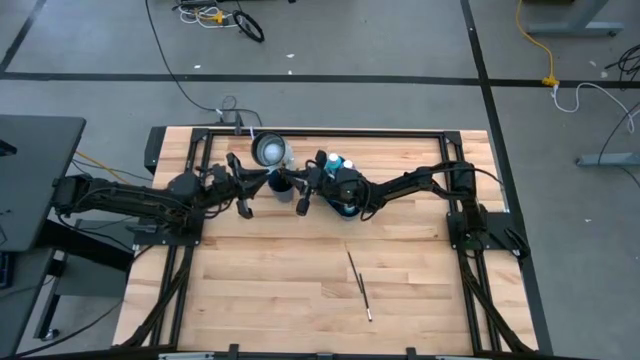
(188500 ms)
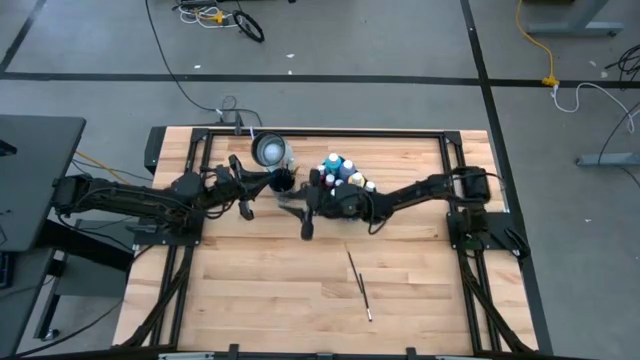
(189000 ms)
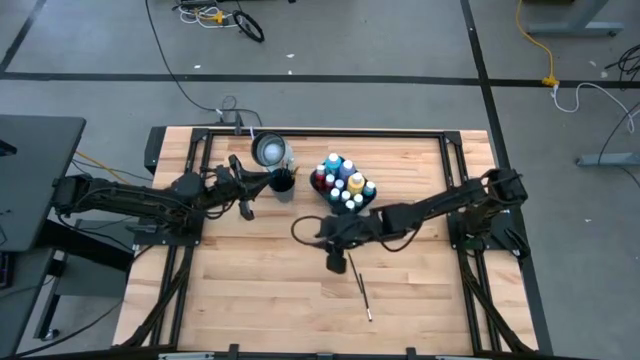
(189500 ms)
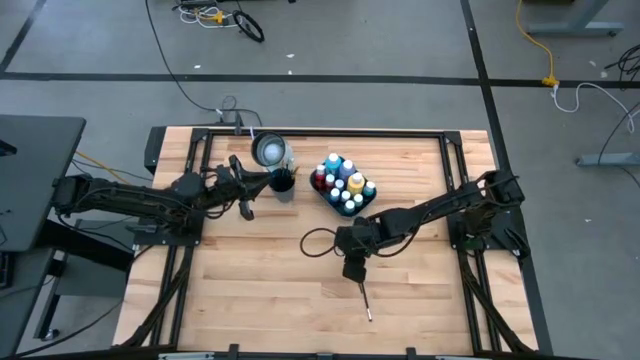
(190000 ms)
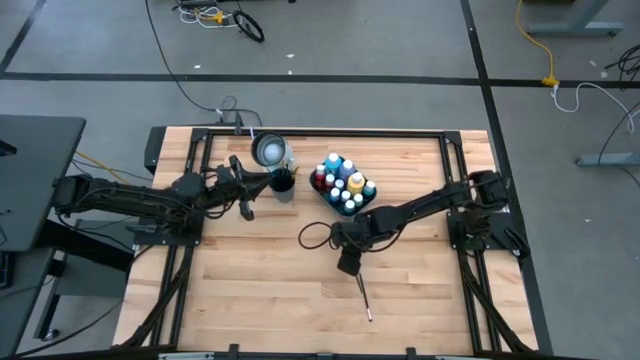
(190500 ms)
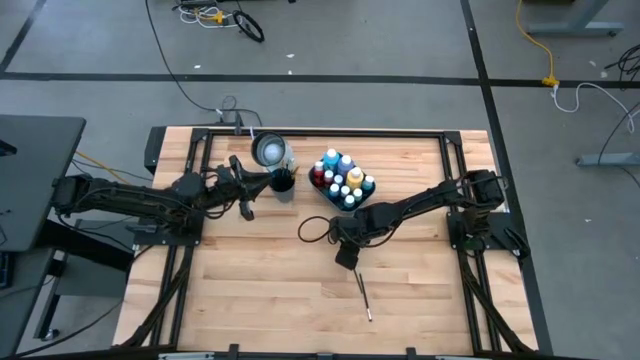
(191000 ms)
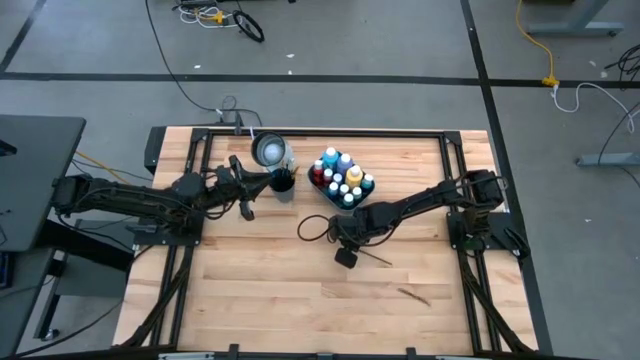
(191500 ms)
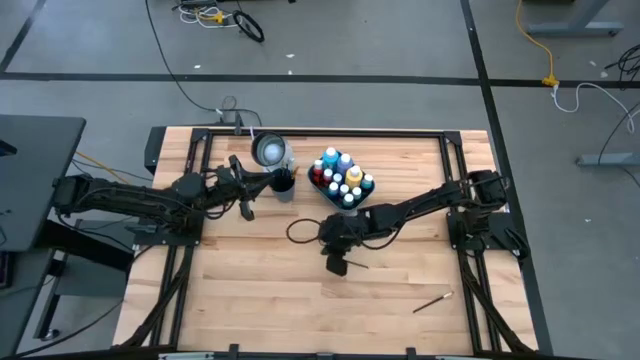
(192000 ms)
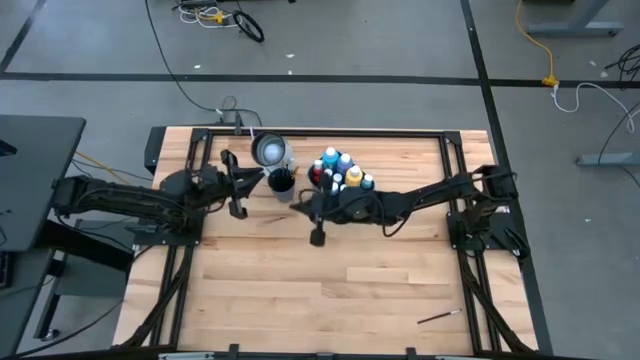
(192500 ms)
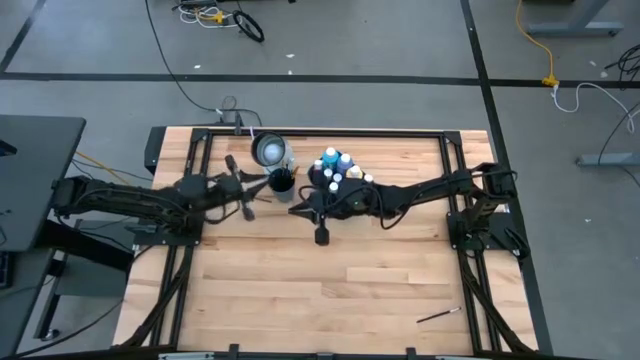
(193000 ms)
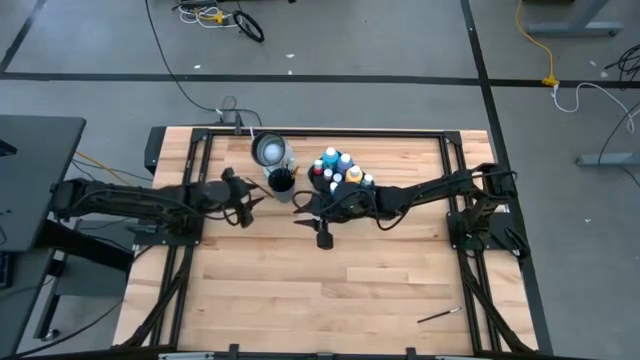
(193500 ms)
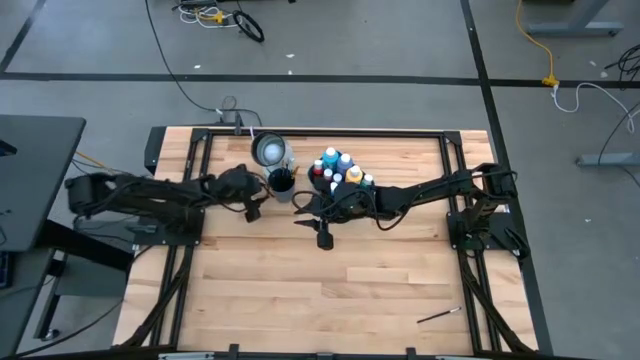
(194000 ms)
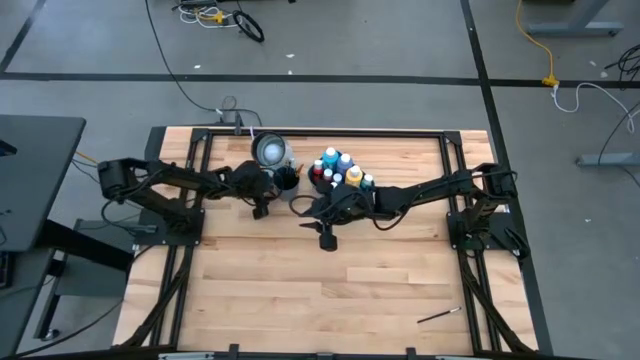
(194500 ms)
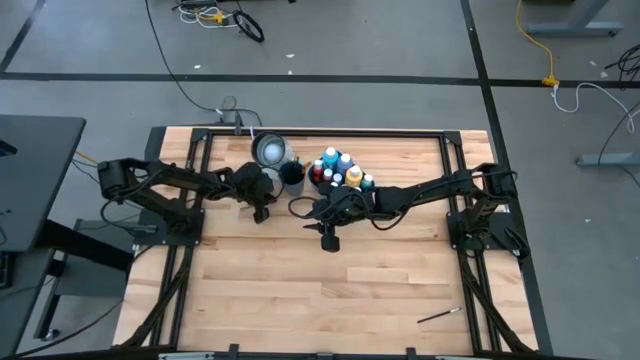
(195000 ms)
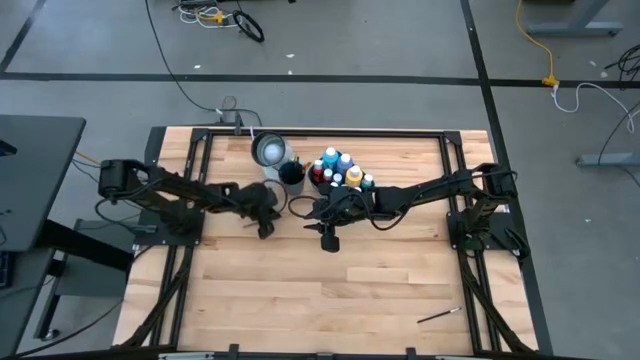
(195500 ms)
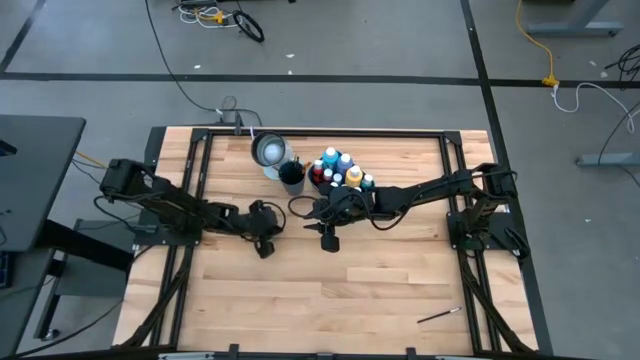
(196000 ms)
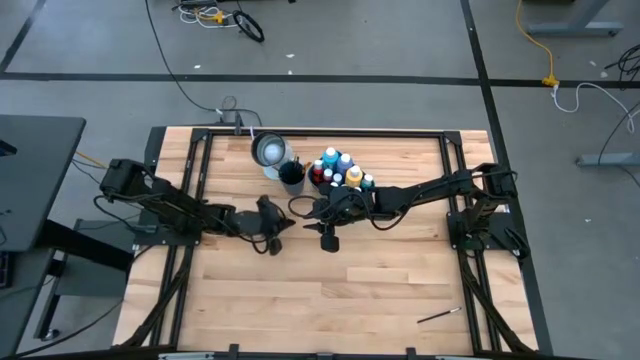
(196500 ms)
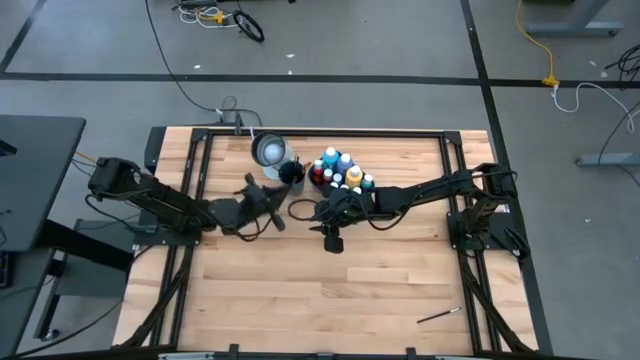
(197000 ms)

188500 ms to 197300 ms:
Task: Pick & Place Paint Supplies
Put the gold paint brush into the blue cup

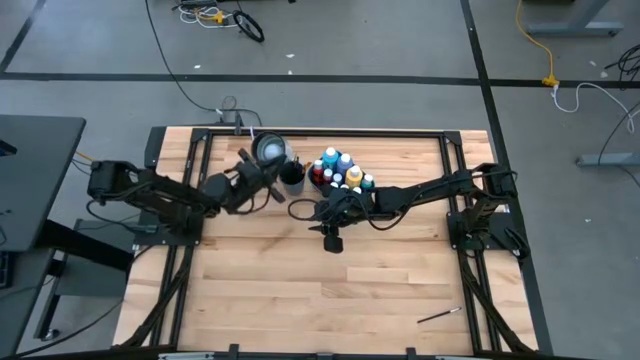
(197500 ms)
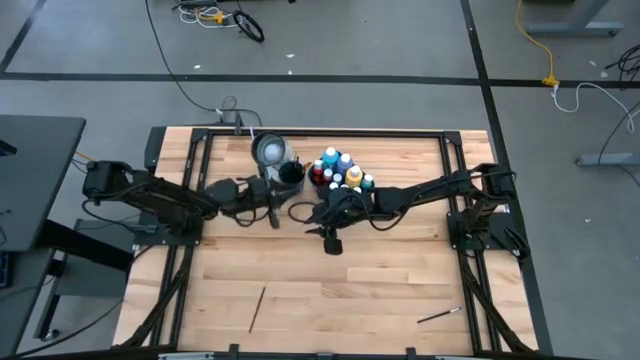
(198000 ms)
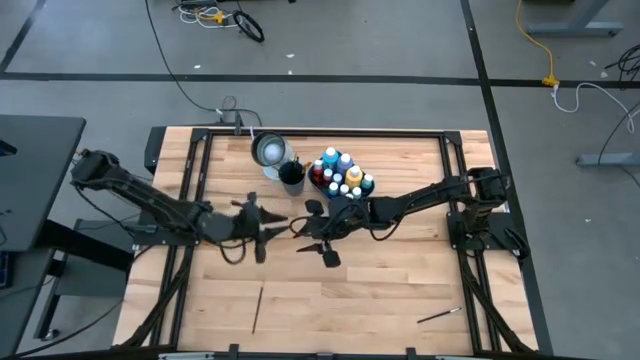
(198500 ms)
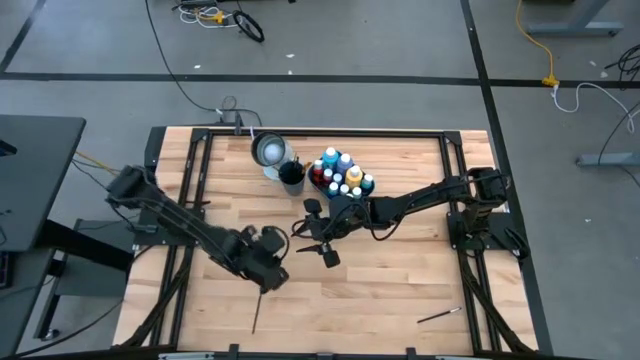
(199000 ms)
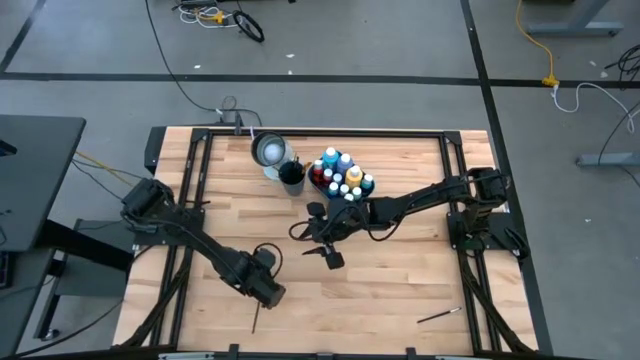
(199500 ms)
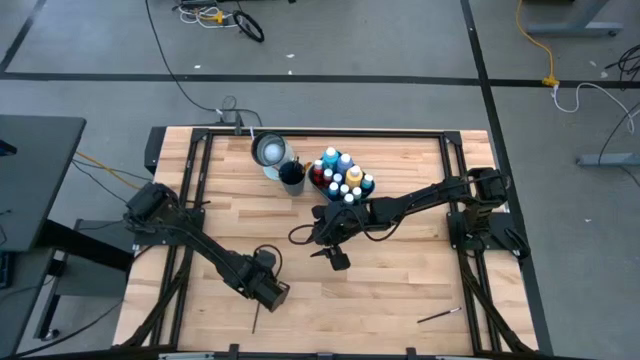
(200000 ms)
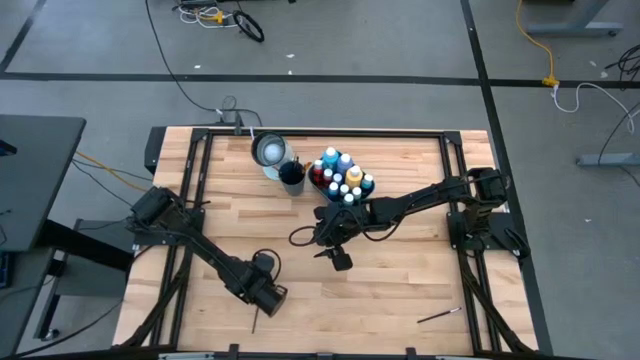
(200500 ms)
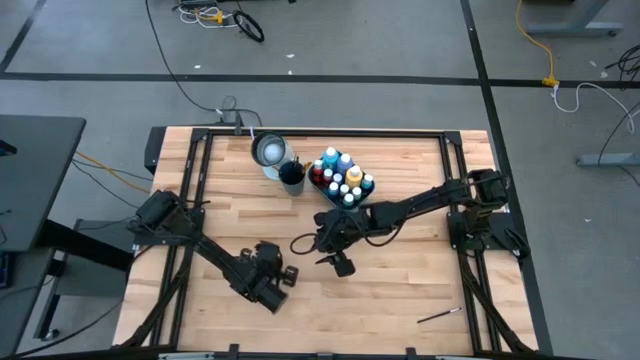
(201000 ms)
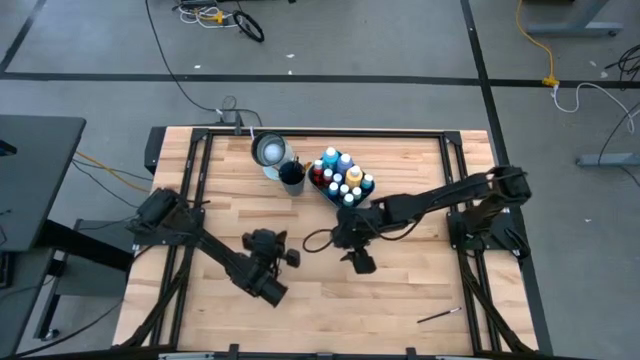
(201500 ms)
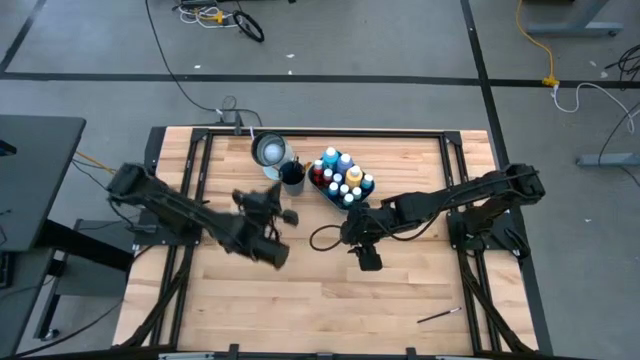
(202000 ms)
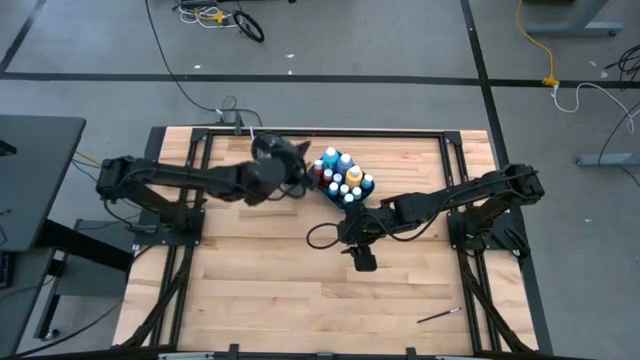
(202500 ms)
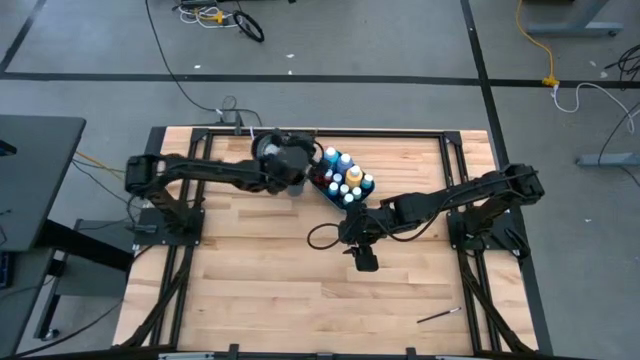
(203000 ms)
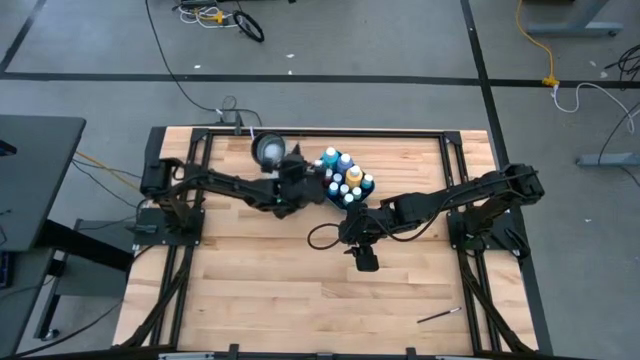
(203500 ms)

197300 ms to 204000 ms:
Put the gold paint brush into the blue cup
